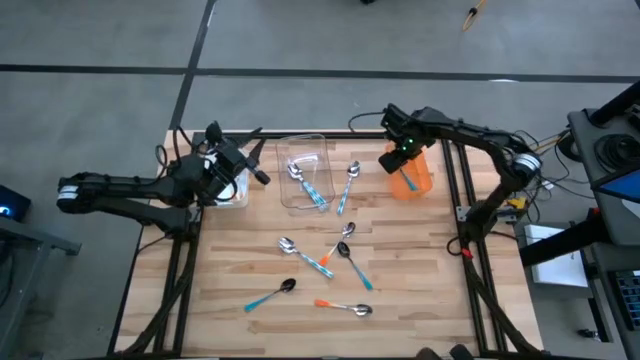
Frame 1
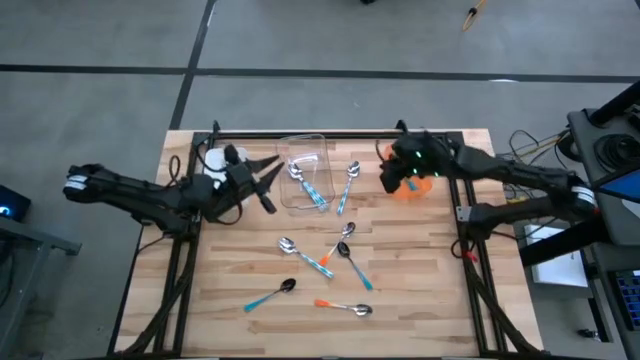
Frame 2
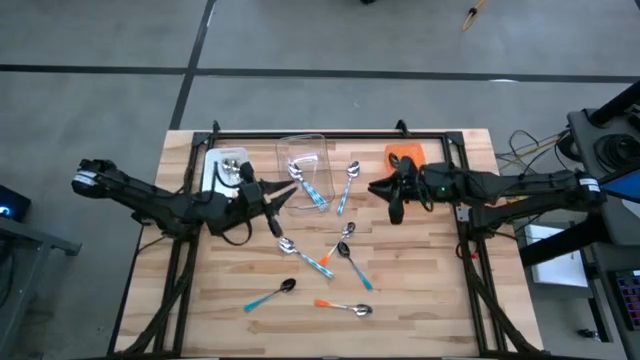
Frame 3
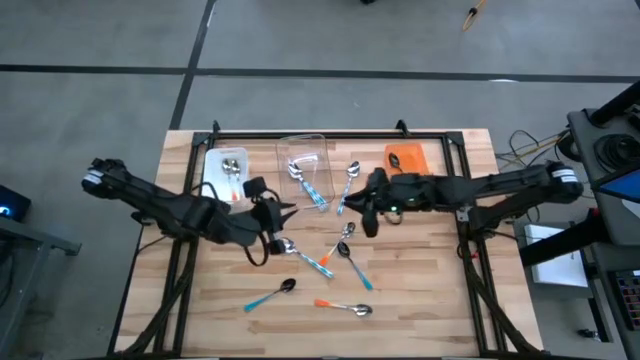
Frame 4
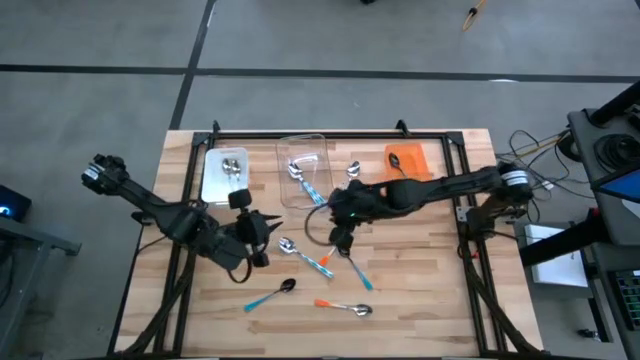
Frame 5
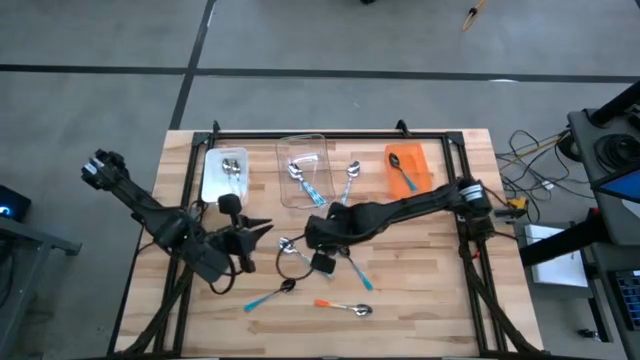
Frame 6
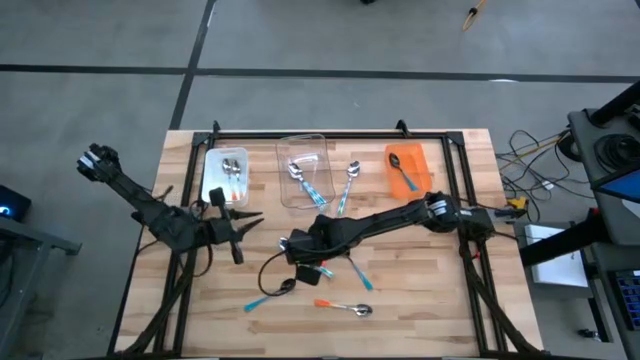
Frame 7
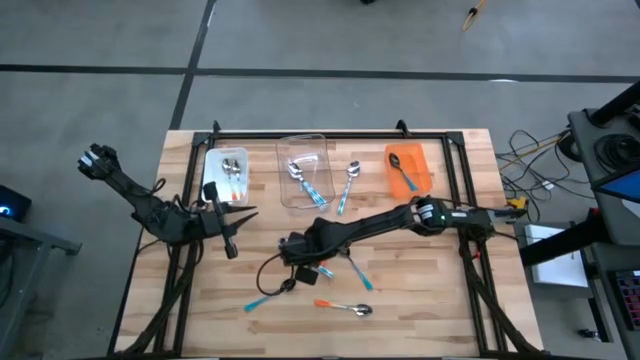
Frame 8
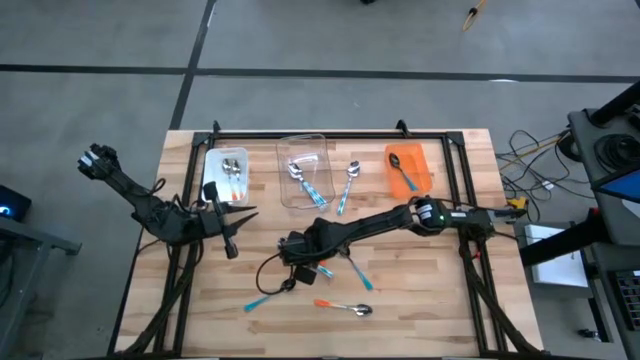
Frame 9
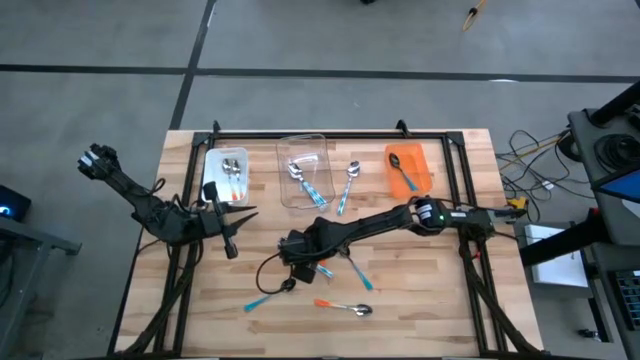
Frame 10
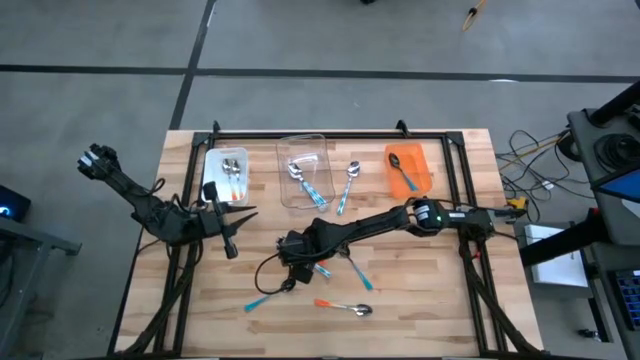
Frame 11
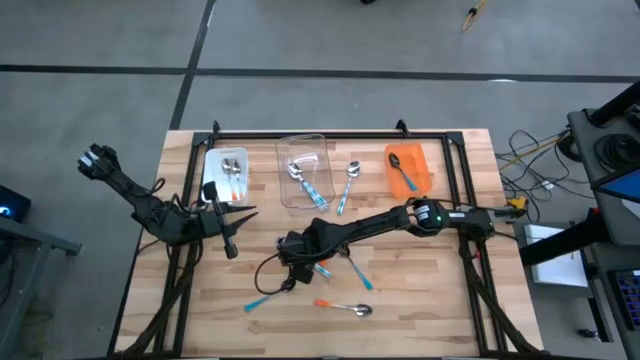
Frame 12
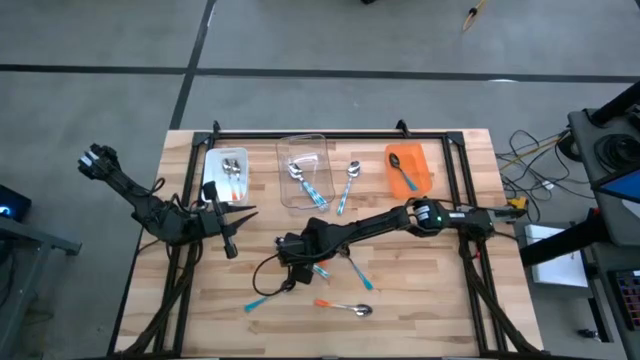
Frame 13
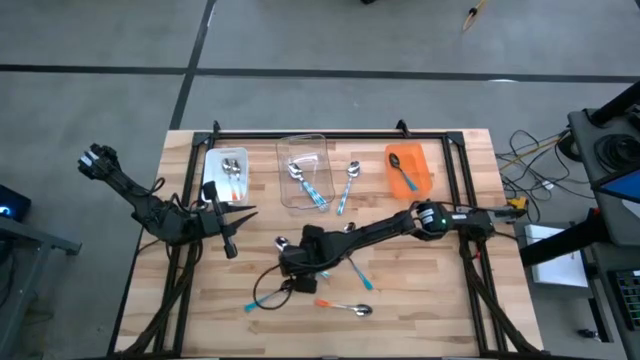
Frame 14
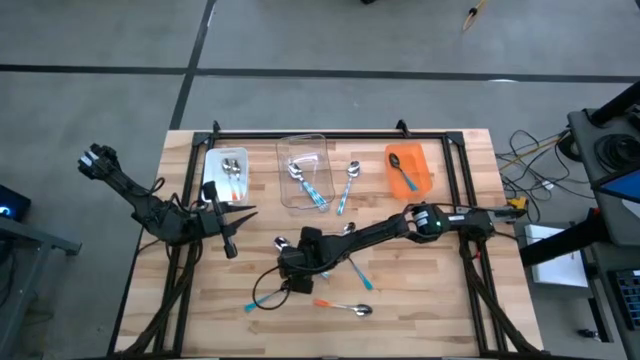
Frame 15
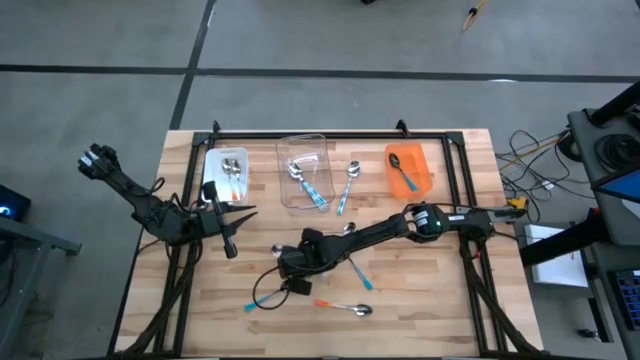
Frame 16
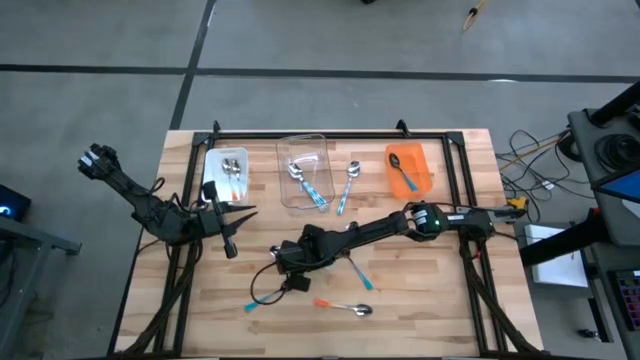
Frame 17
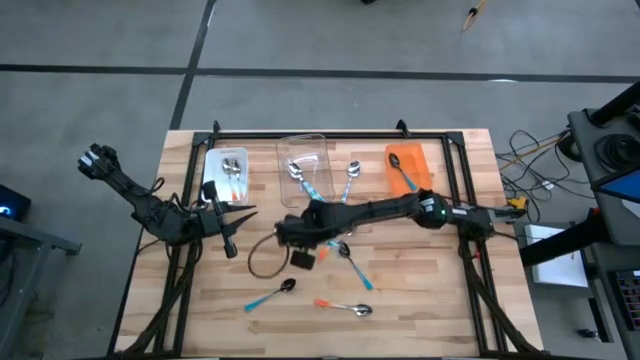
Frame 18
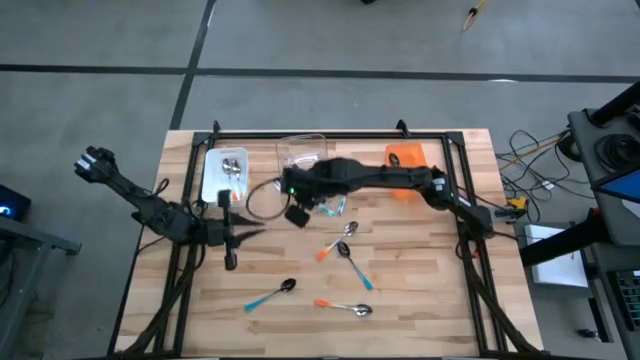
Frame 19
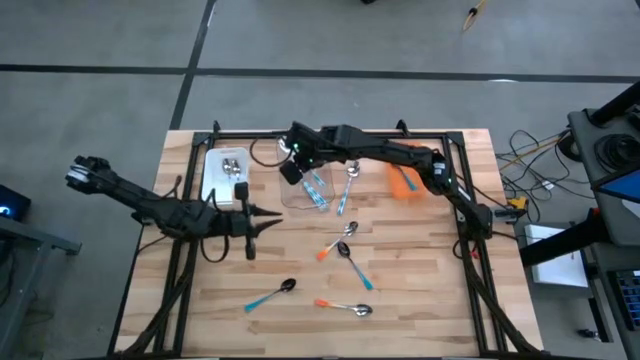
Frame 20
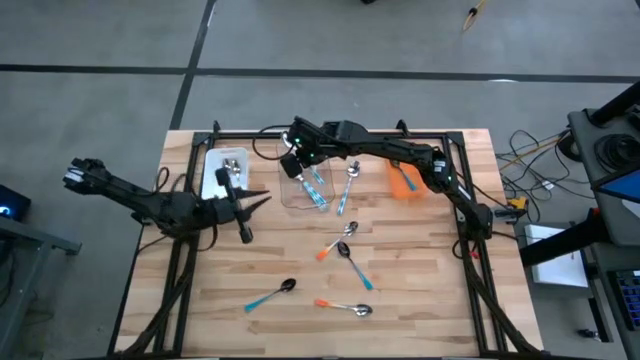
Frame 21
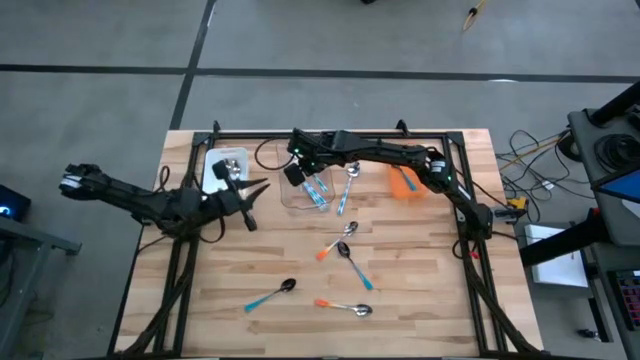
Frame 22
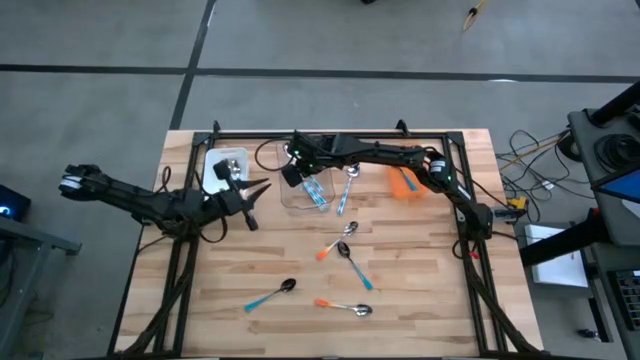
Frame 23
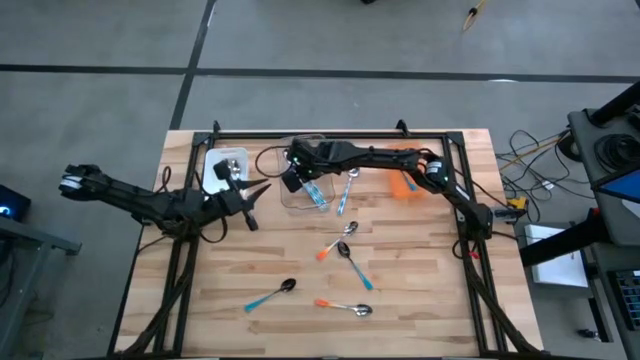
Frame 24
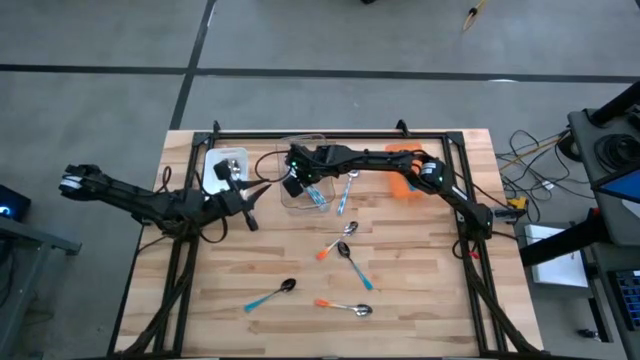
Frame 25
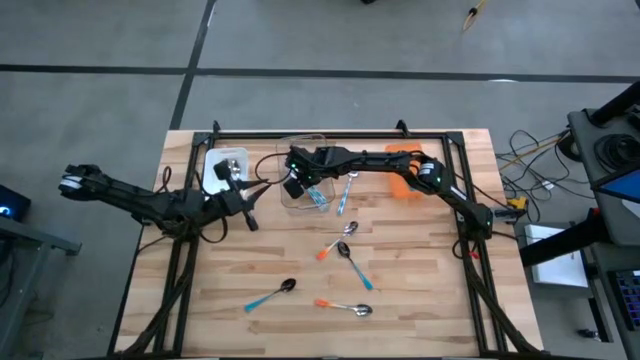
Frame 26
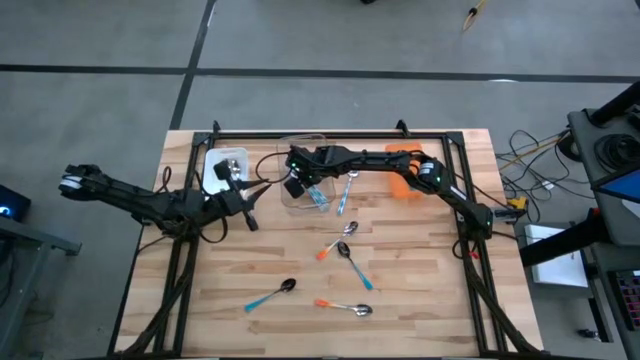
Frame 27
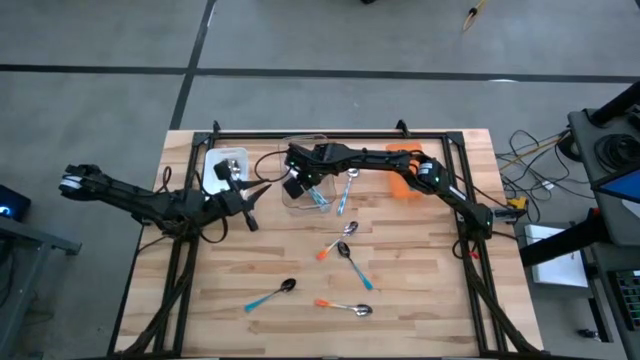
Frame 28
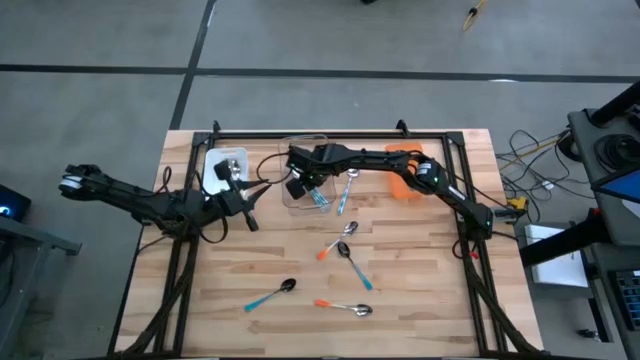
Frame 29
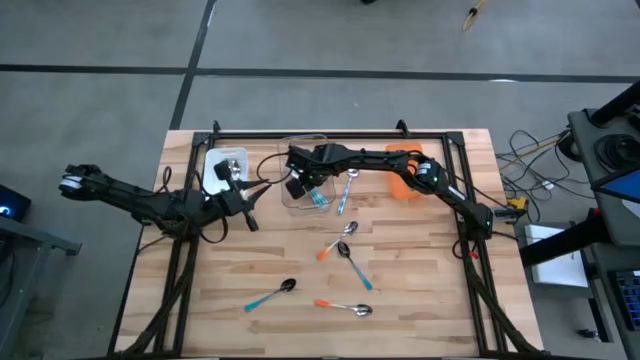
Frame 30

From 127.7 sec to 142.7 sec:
Task: Sort silverware by color (type)
Put the blue patterned spoon into the transparent bin

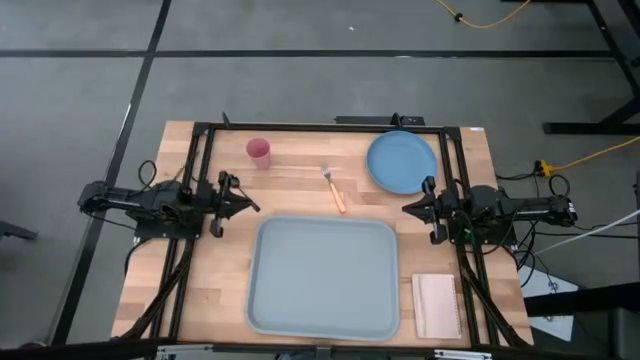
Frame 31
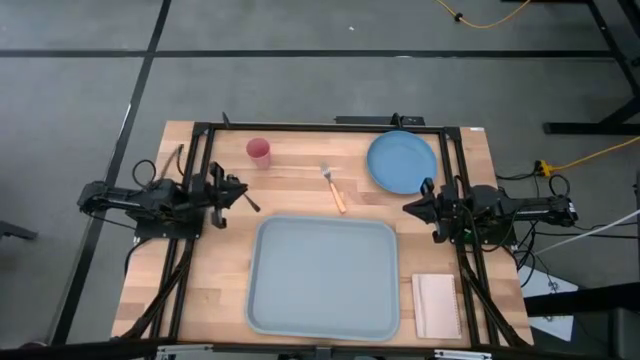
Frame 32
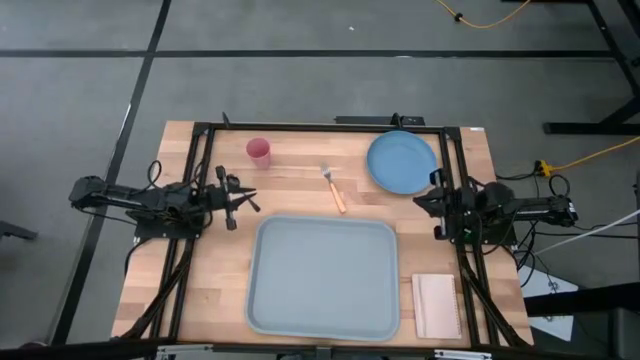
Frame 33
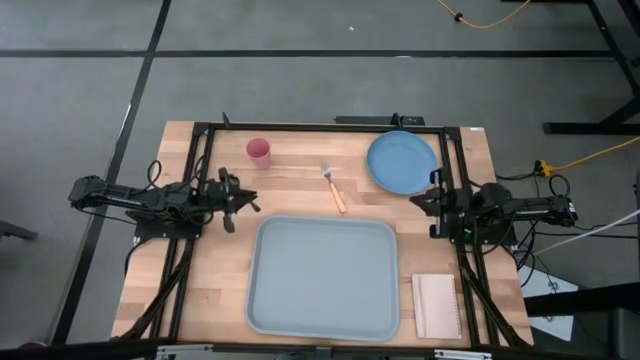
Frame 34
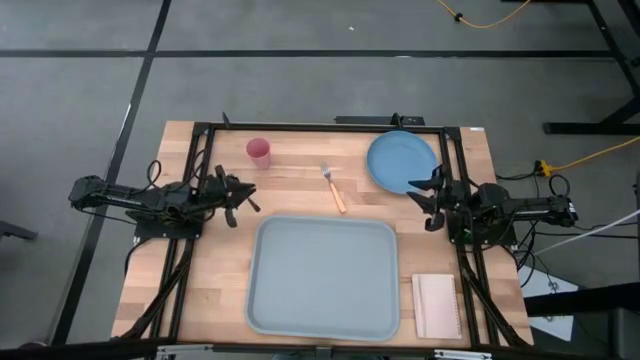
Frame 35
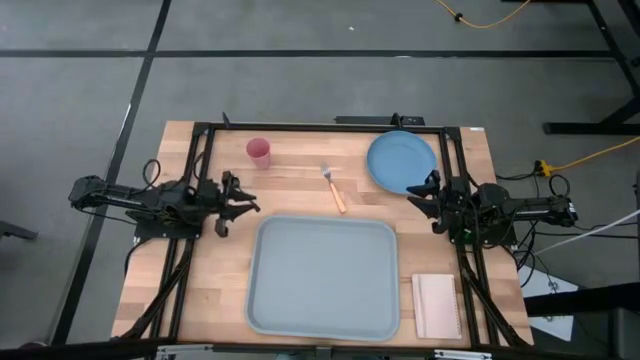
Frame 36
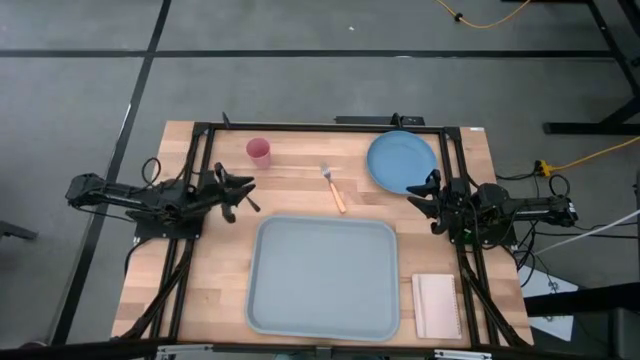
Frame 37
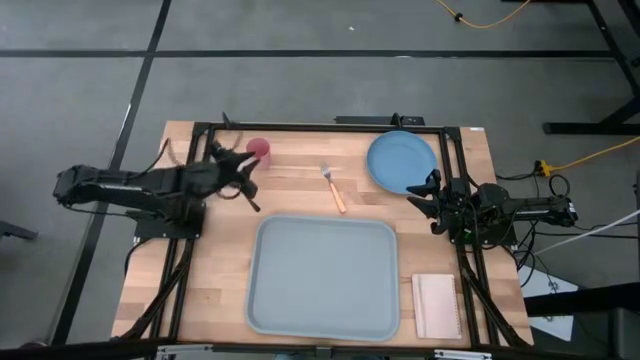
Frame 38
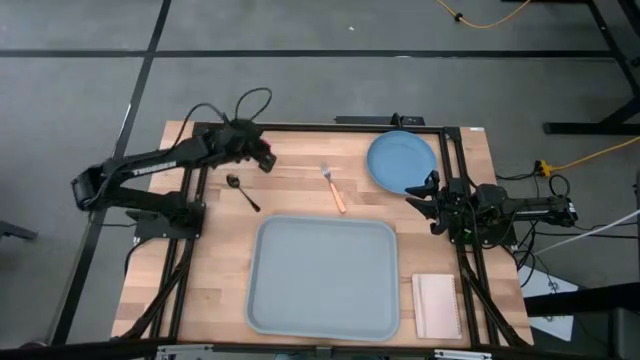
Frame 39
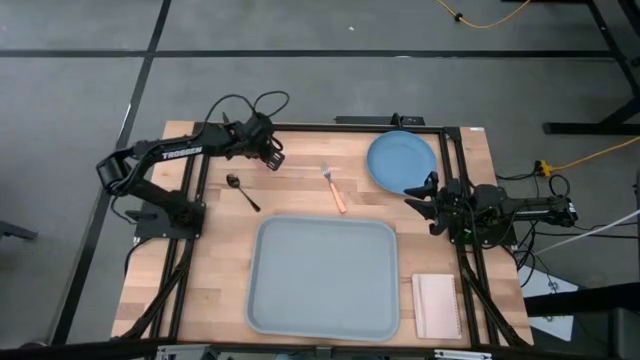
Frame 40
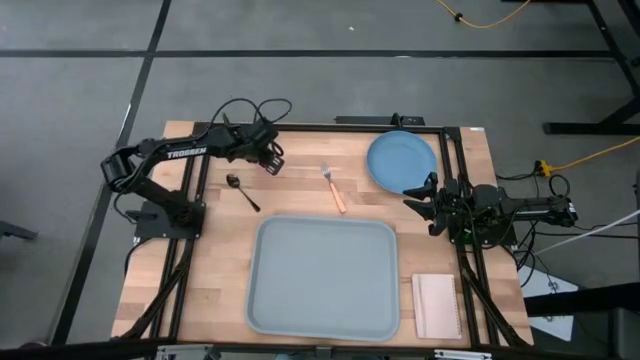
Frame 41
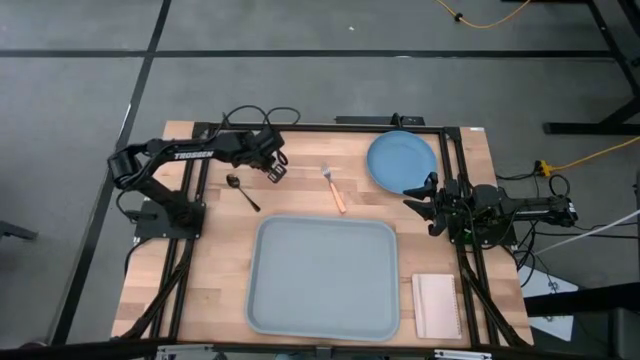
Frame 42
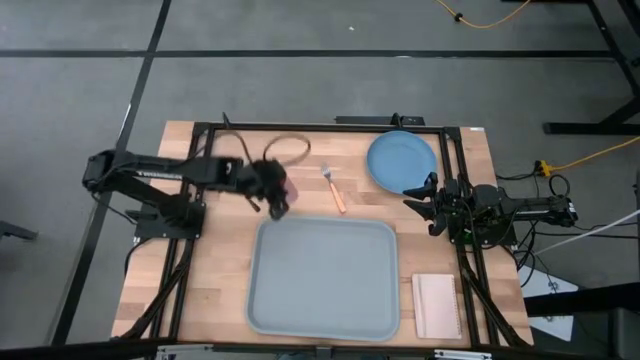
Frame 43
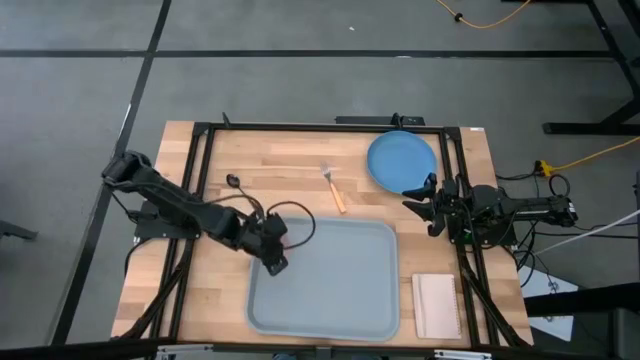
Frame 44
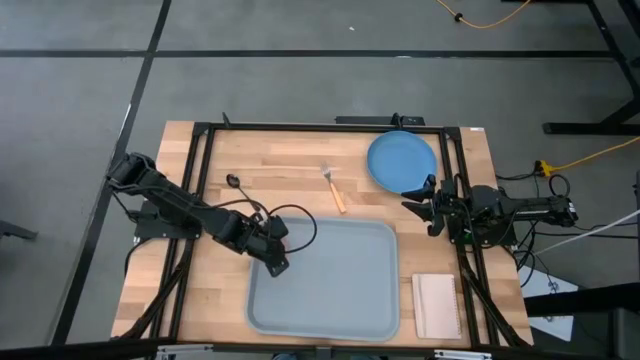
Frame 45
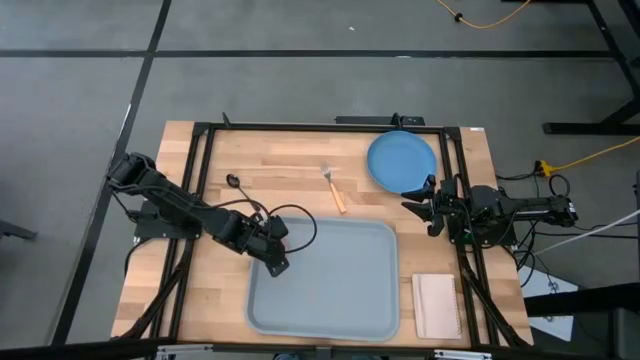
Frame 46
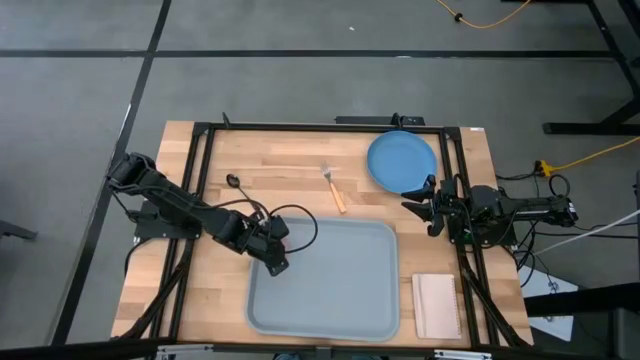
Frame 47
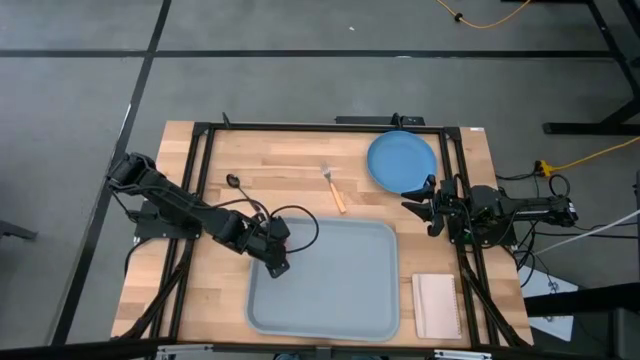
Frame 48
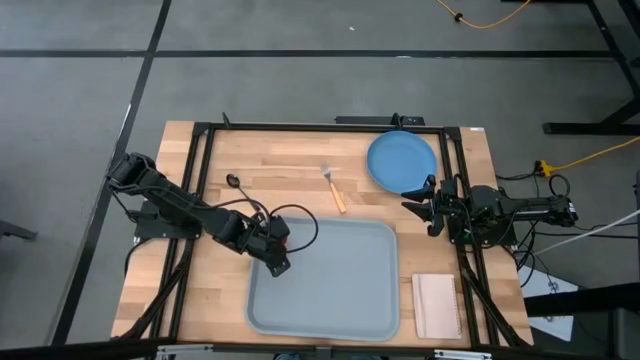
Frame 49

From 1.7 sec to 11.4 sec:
Task: Pick and place plate/cup/fork/spoon on tray
Put the pink cup on the gray tray
